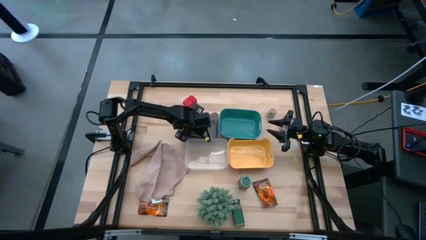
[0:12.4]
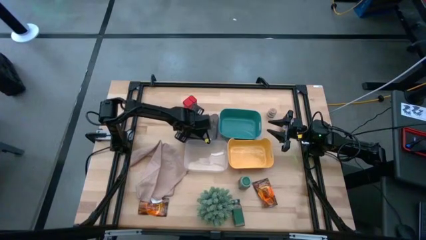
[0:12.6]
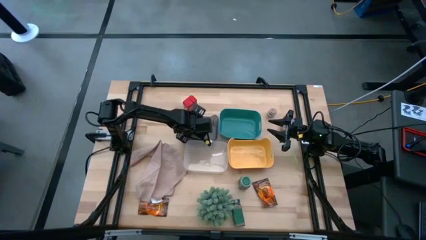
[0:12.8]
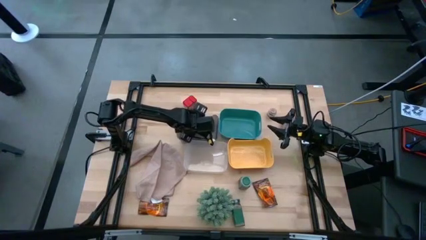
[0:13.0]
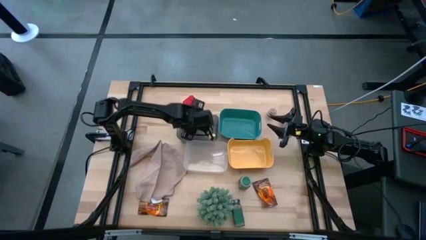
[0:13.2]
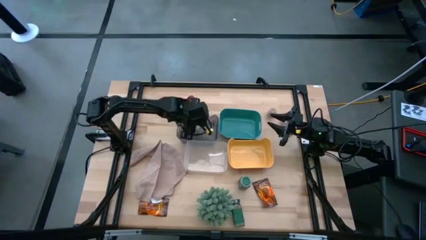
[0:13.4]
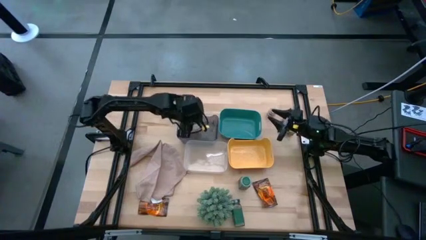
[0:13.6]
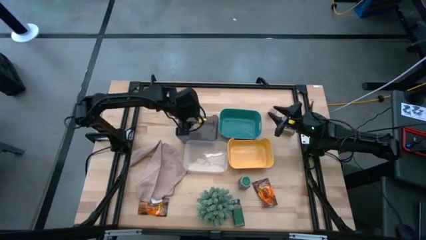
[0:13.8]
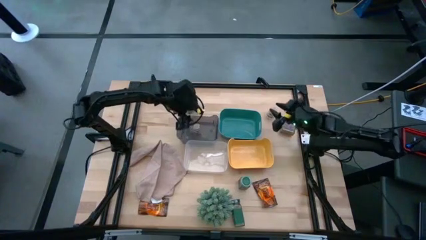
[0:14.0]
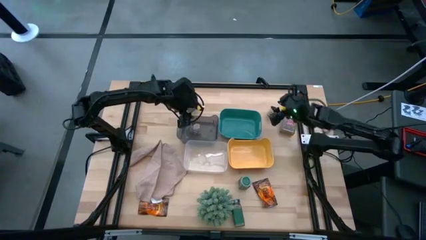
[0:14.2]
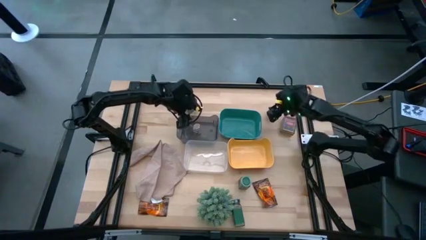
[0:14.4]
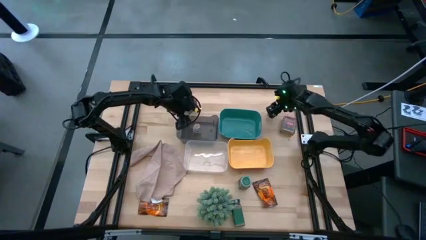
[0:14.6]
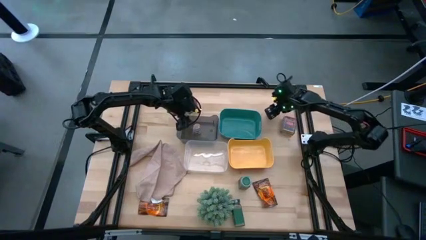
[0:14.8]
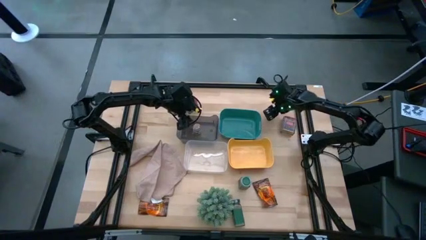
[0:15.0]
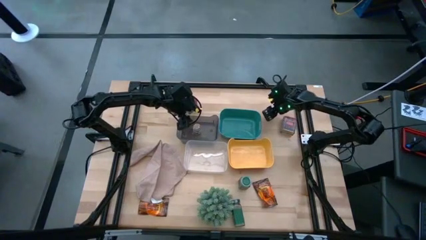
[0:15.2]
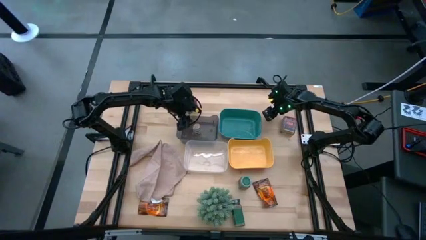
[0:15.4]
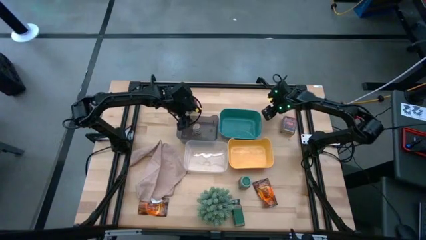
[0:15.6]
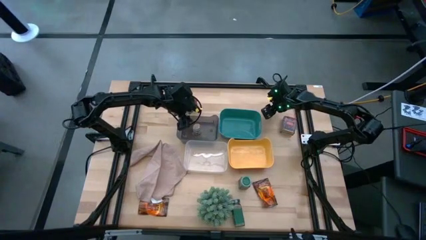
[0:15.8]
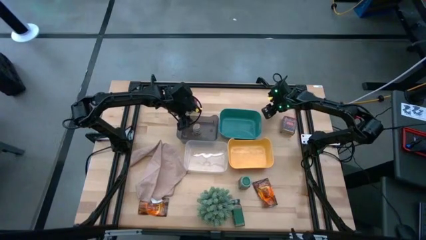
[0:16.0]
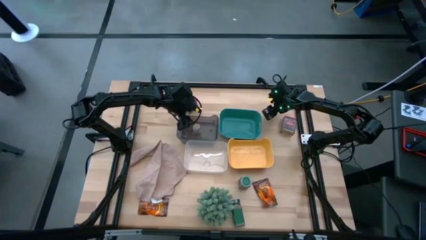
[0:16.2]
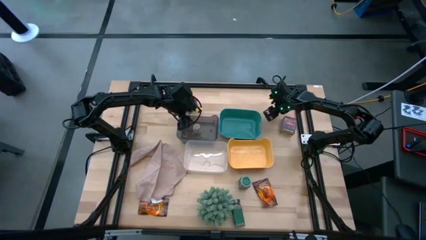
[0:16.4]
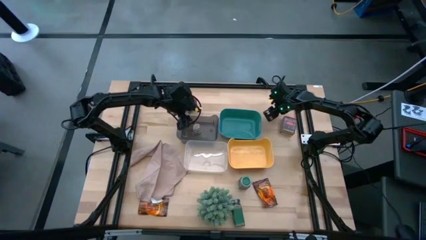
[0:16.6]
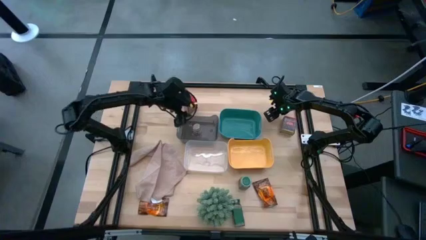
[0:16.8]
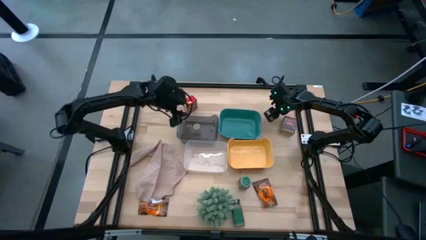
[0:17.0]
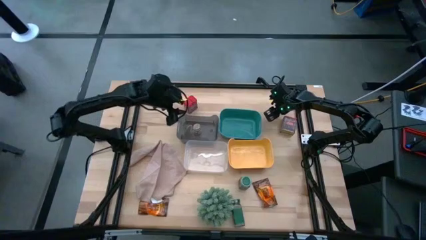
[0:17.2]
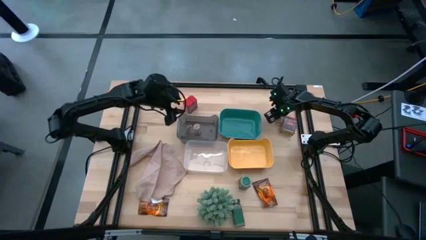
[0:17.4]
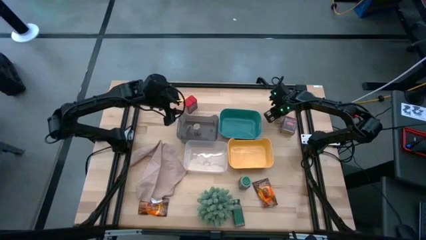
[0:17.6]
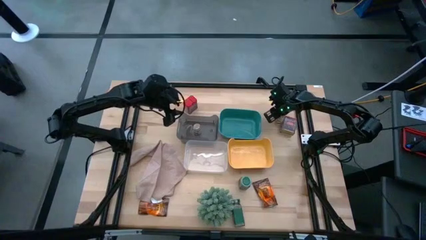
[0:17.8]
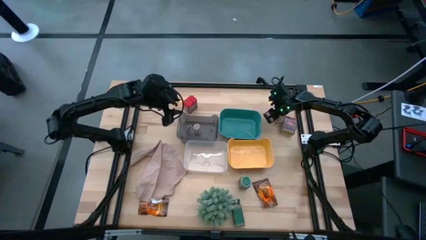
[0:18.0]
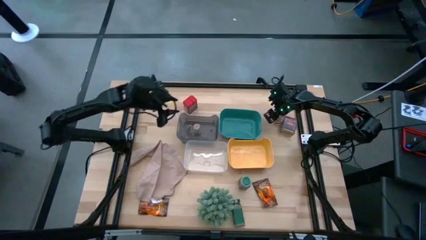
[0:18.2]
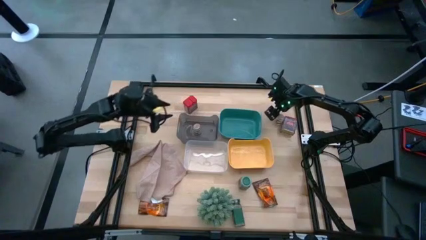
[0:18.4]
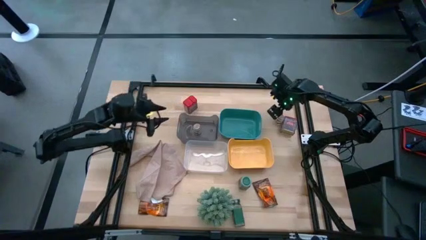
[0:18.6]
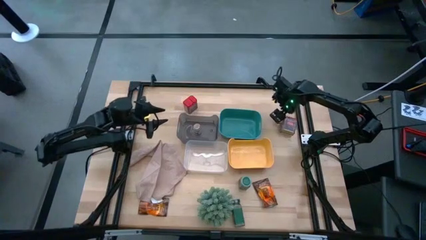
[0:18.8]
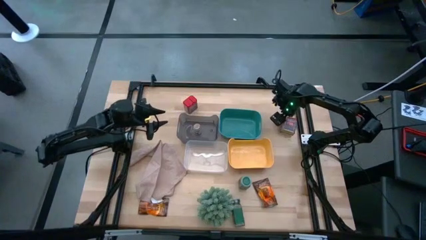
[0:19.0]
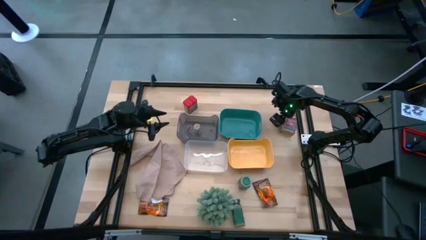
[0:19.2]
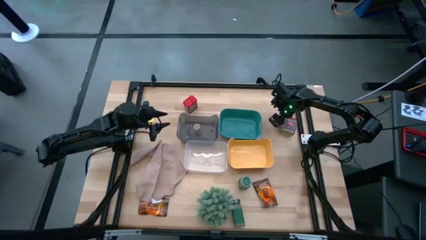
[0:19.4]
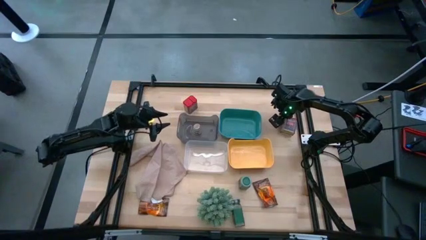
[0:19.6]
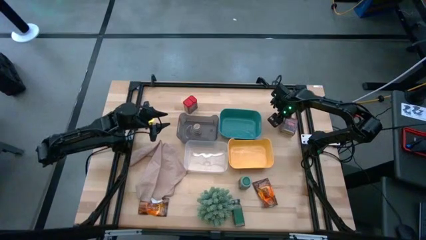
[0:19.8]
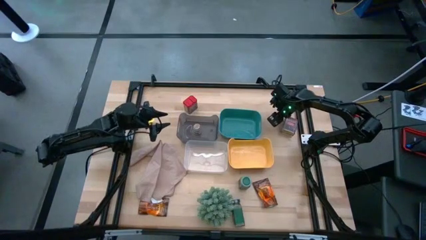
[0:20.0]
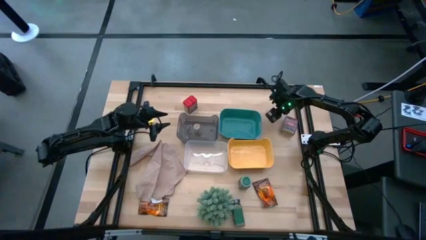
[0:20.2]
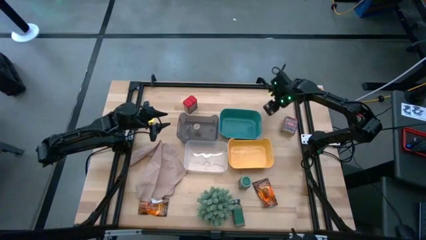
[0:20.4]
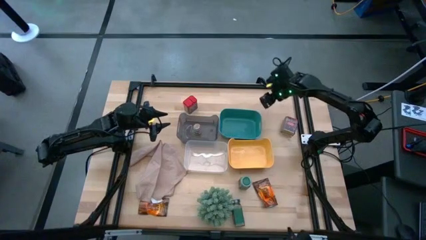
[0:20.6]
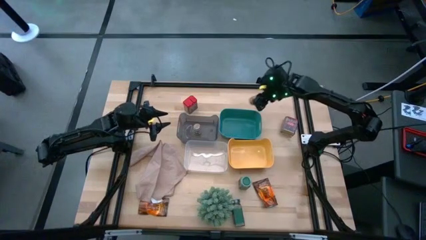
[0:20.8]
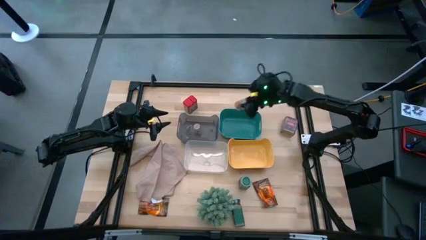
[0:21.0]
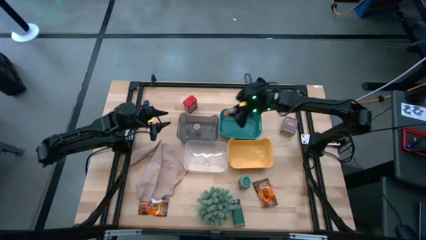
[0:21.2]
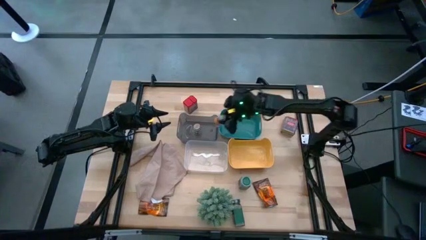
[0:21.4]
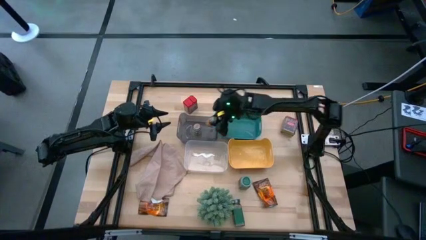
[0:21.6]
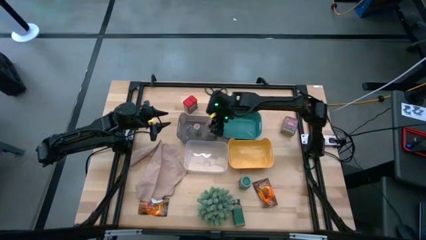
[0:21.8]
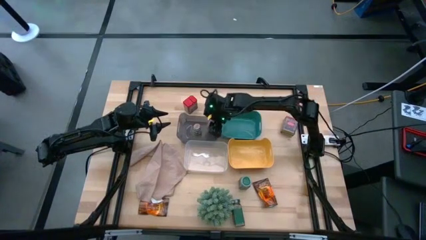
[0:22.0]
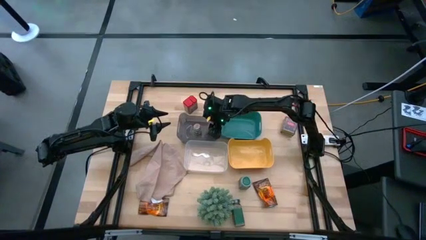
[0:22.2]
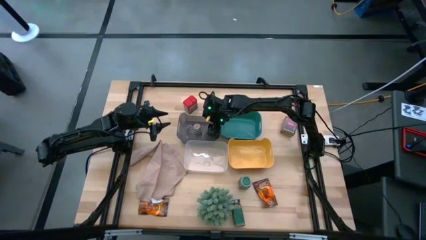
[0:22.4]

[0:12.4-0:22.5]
Task: Sort spices by type
Put the brown seasoning bottle into the black bin

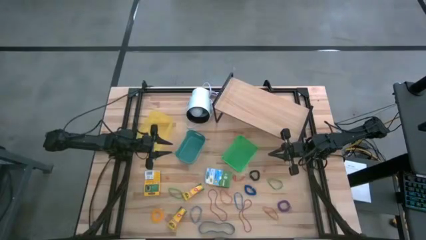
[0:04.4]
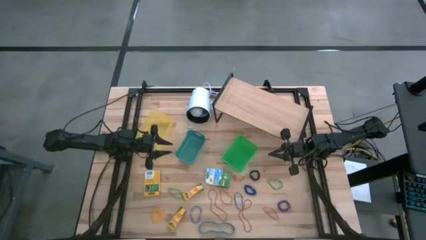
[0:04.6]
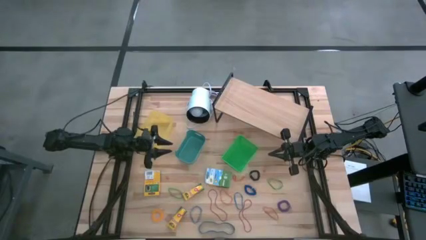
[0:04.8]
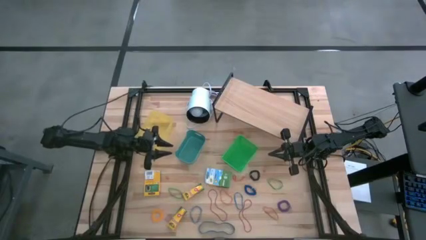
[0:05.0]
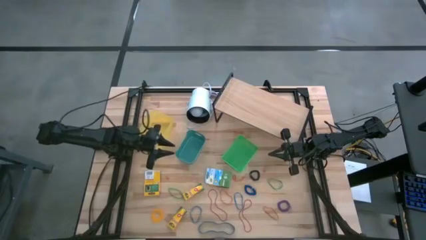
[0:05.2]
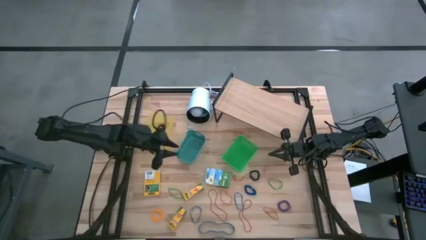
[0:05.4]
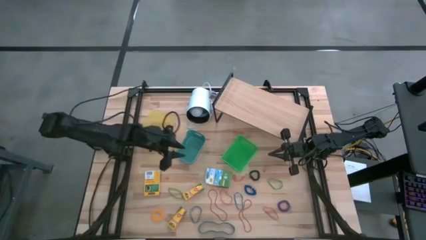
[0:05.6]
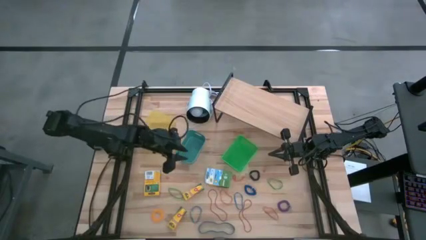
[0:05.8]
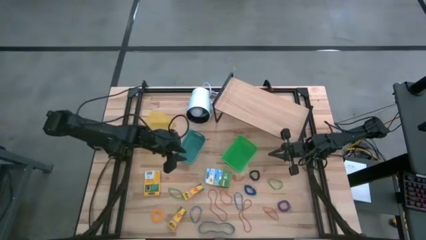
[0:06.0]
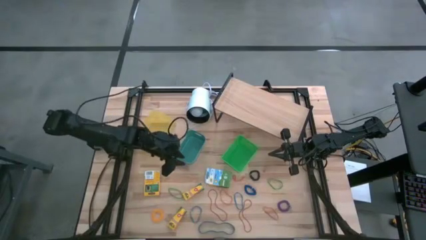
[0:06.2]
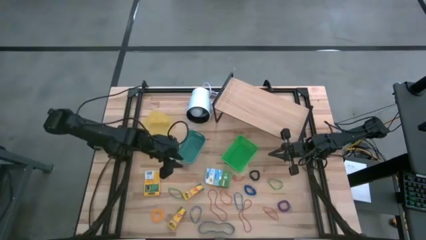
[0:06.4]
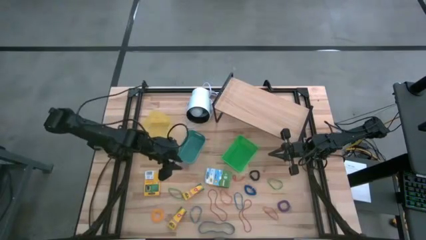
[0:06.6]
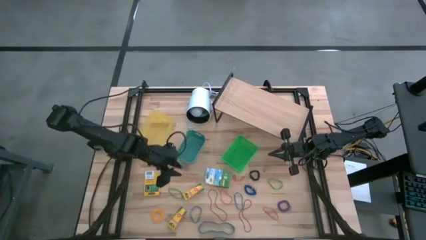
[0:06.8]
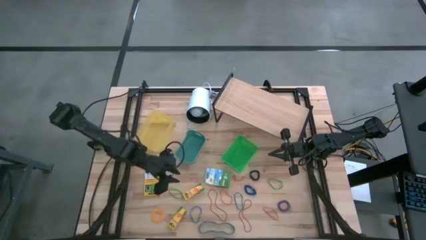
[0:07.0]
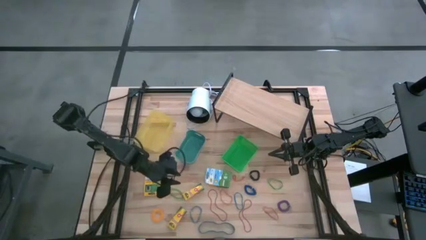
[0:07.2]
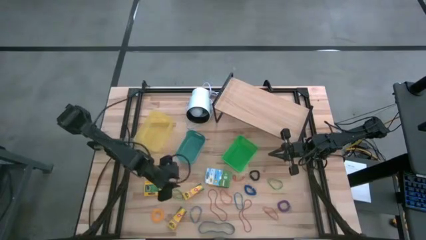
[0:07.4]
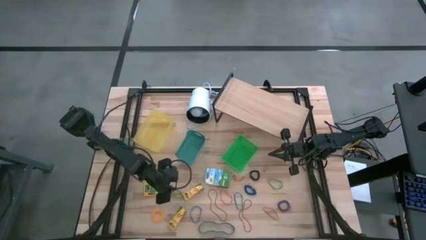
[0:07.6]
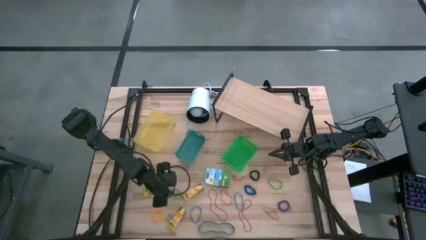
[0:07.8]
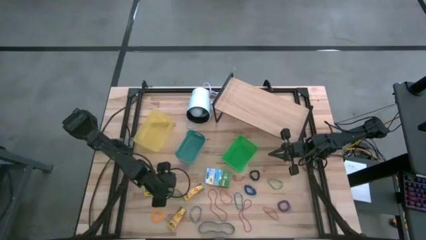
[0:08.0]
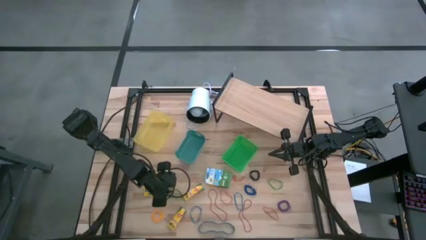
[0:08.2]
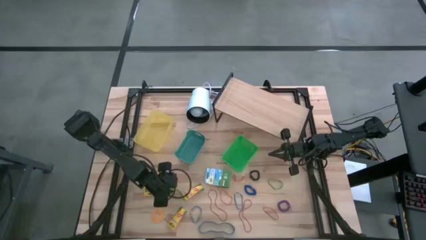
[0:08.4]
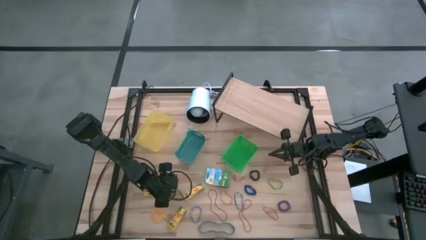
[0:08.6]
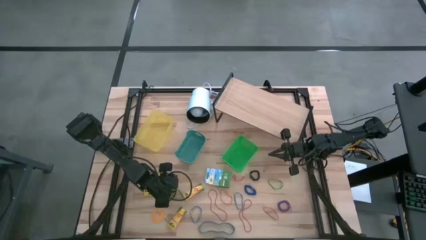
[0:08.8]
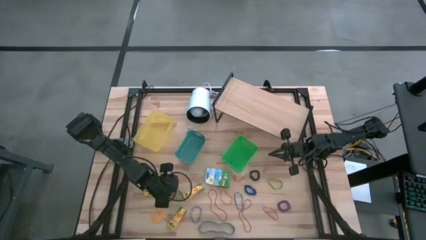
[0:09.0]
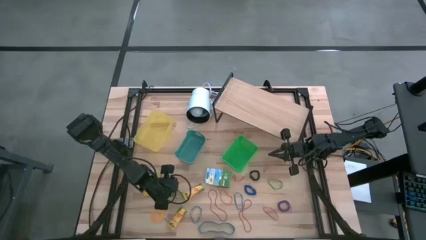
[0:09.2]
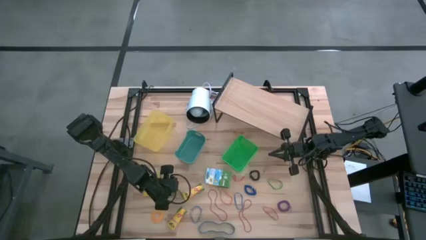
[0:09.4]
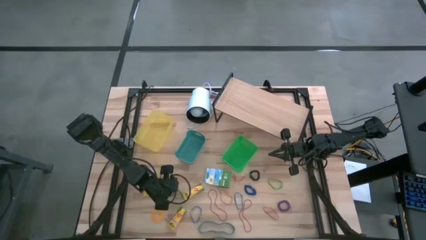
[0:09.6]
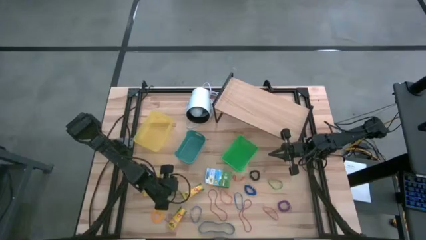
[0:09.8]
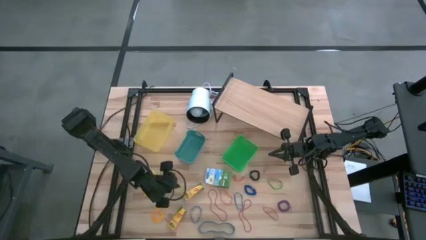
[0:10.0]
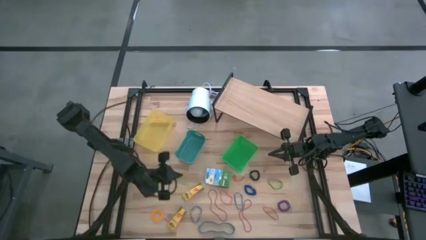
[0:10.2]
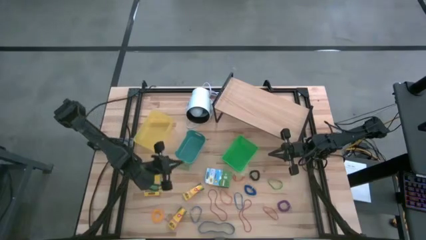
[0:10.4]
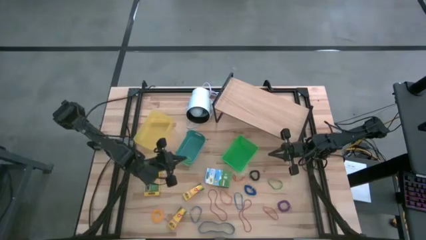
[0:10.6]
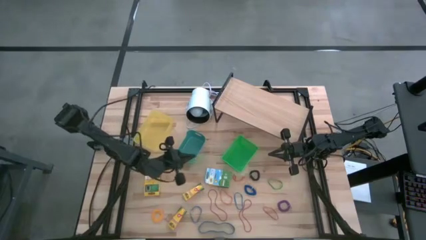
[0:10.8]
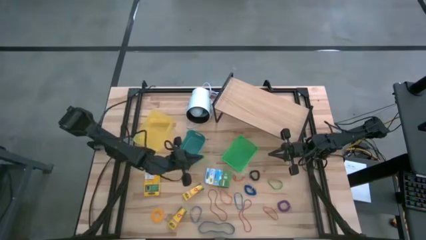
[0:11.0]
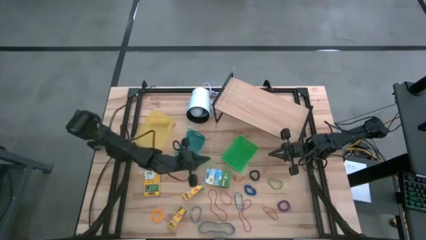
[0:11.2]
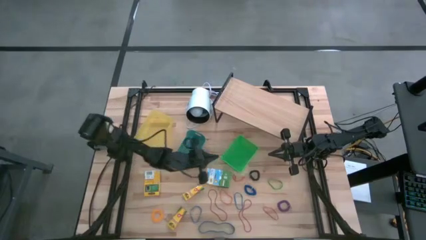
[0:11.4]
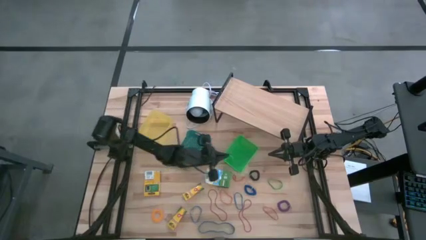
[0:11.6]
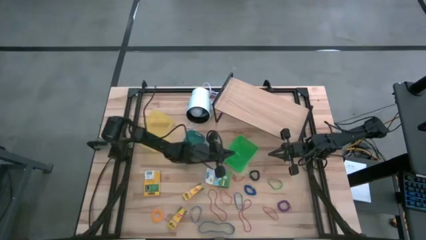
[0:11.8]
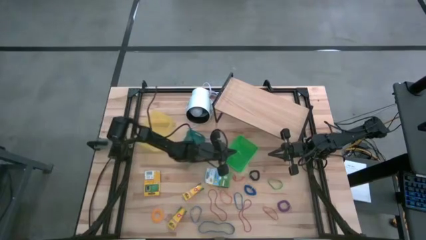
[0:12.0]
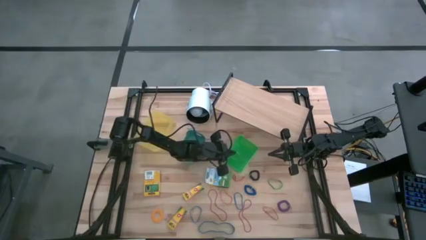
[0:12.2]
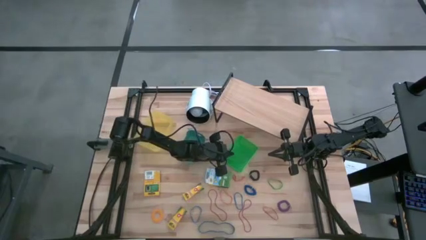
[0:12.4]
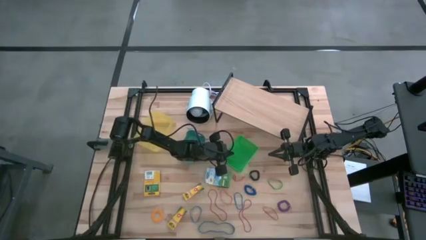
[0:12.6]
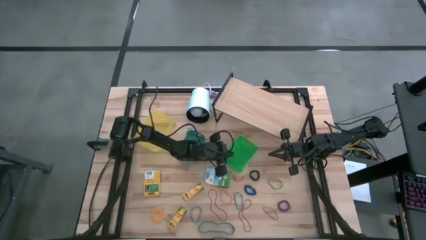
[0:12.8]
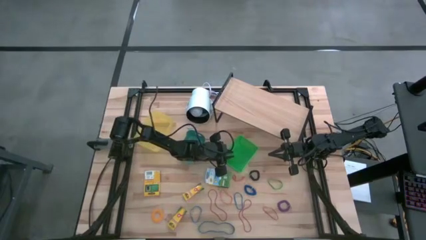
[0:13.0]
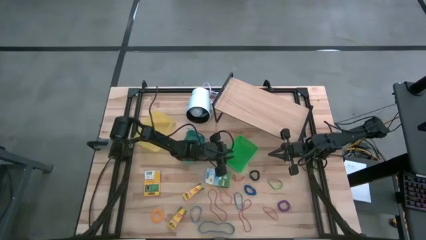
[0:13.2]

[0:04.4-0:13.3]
Task: Pick & Place Office Desk Supplies
Put the left green rubber band into the green bin
